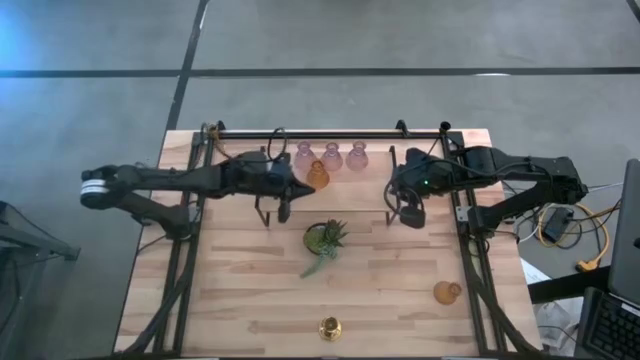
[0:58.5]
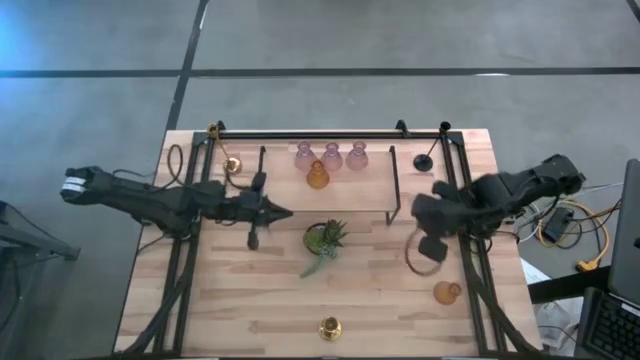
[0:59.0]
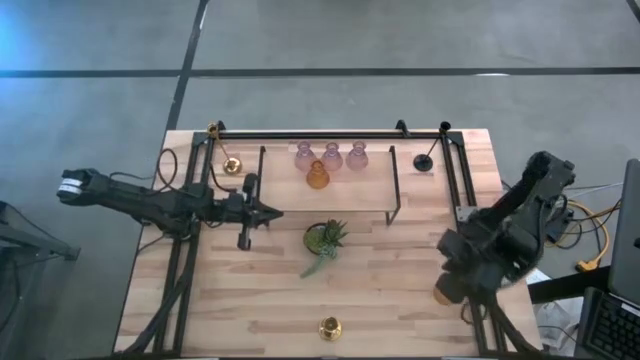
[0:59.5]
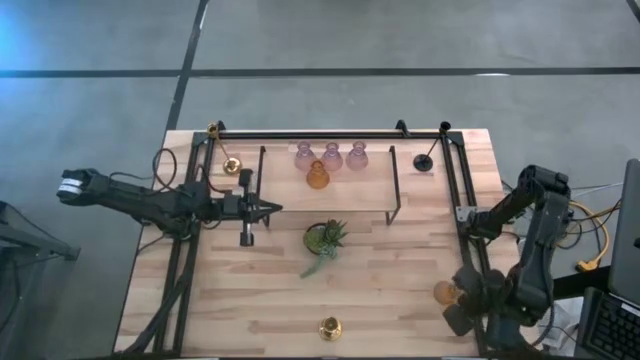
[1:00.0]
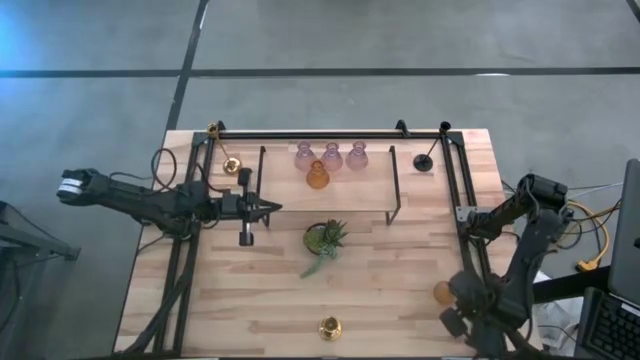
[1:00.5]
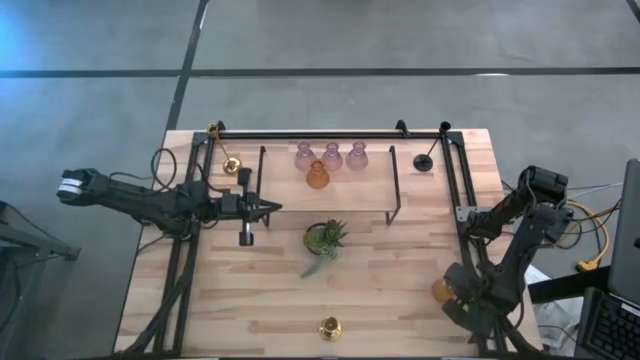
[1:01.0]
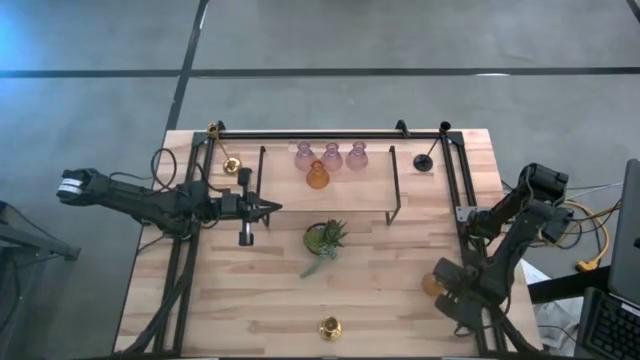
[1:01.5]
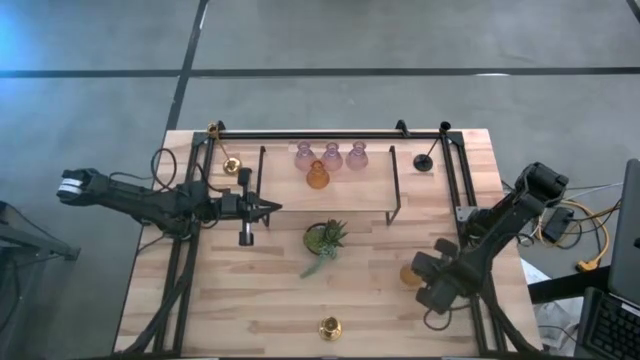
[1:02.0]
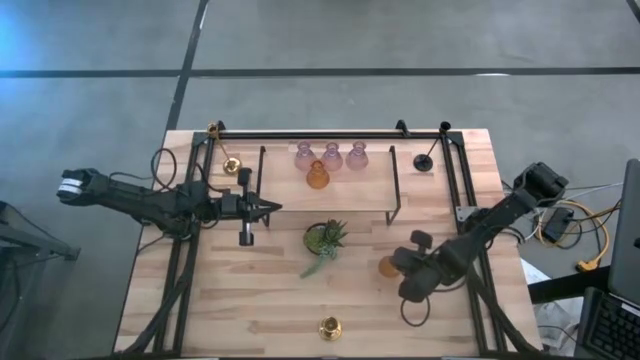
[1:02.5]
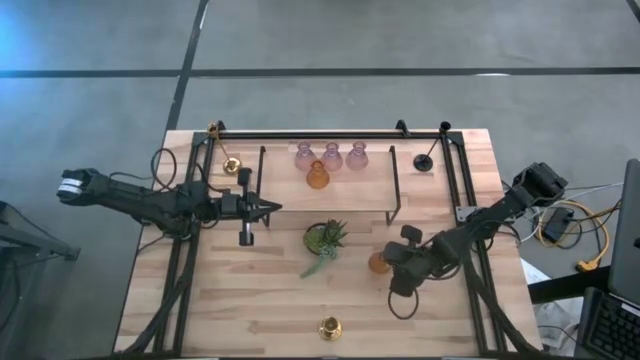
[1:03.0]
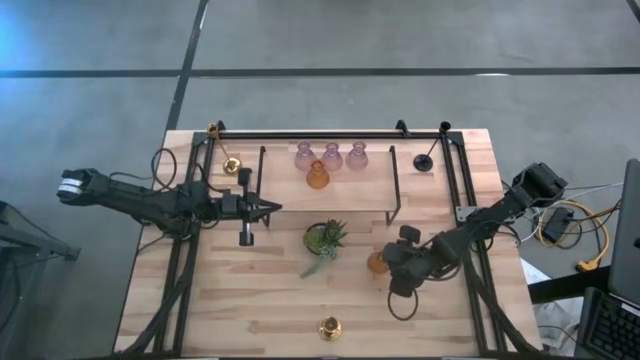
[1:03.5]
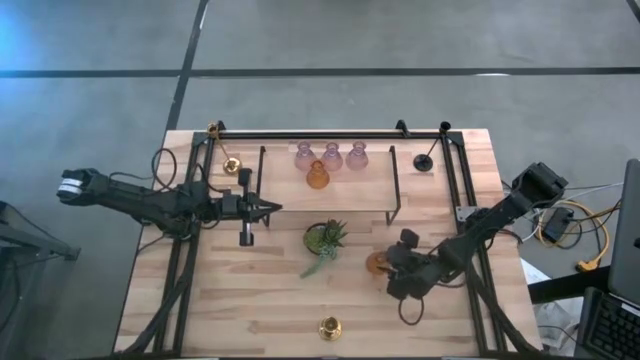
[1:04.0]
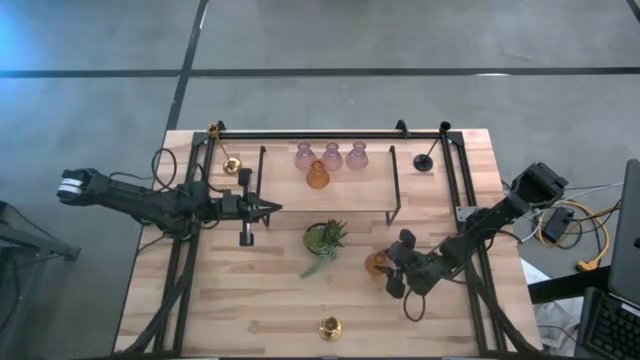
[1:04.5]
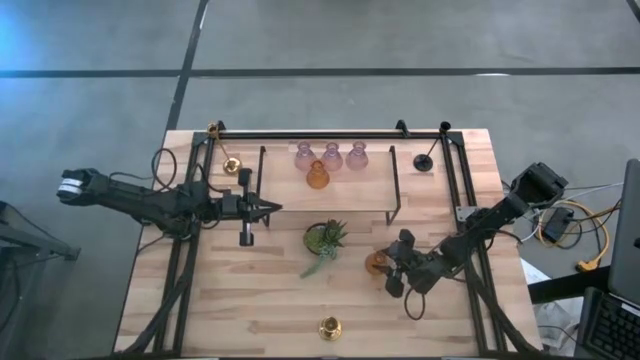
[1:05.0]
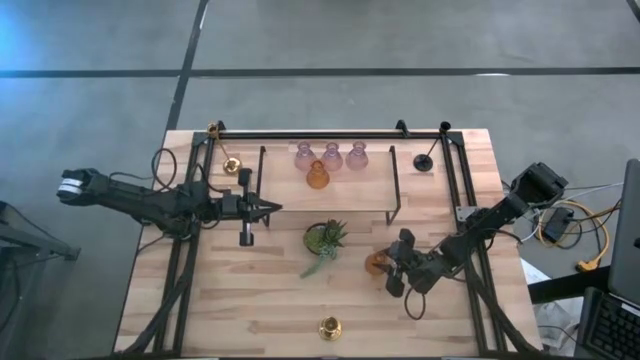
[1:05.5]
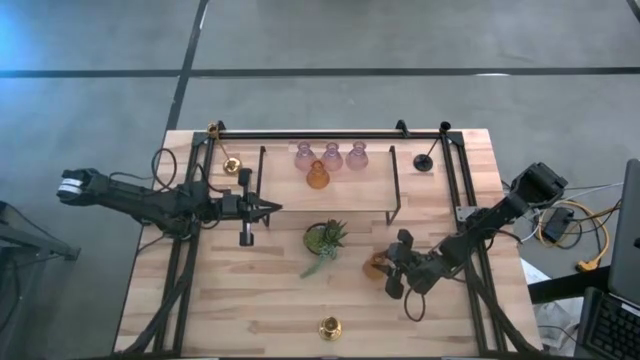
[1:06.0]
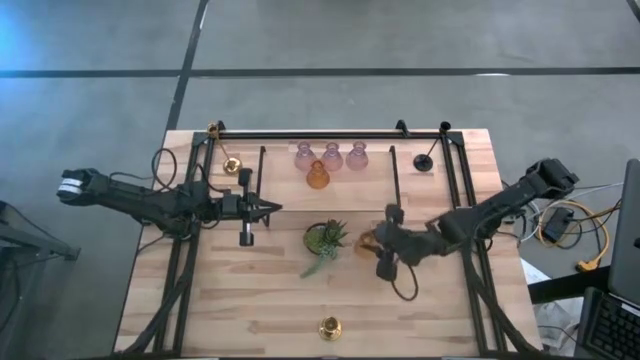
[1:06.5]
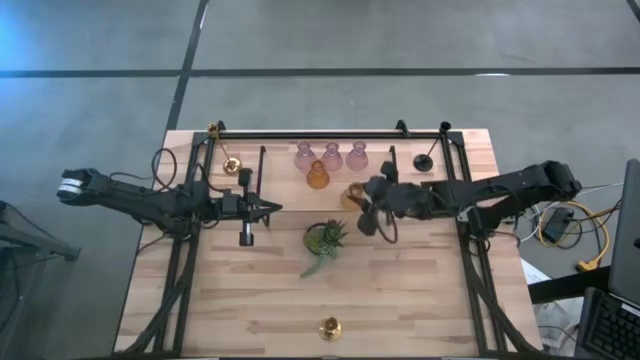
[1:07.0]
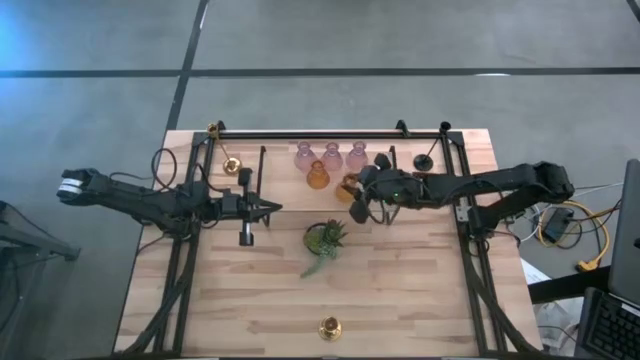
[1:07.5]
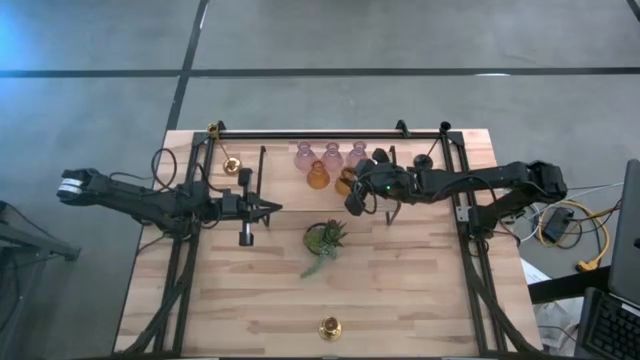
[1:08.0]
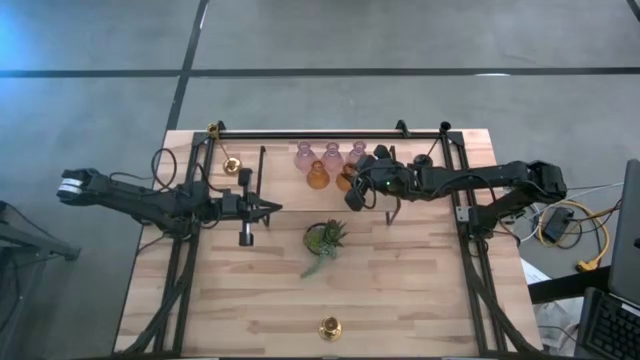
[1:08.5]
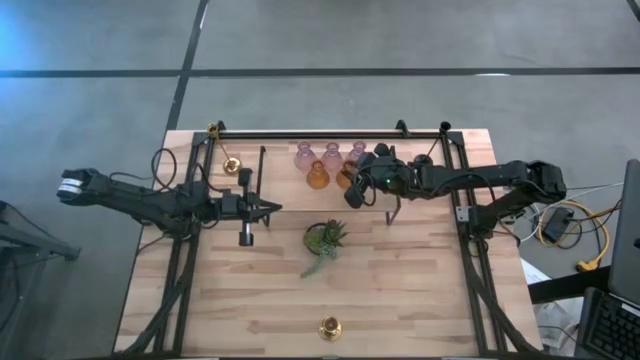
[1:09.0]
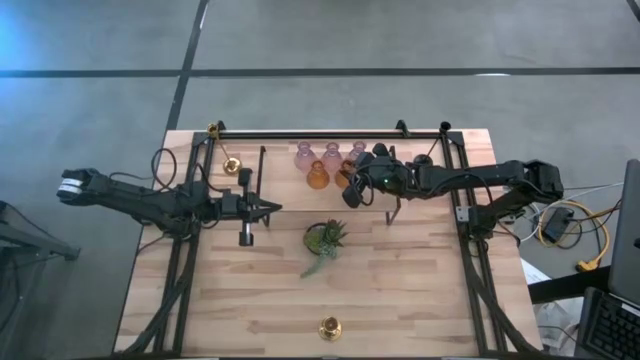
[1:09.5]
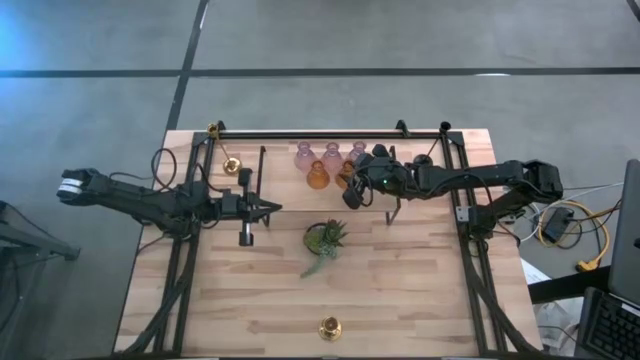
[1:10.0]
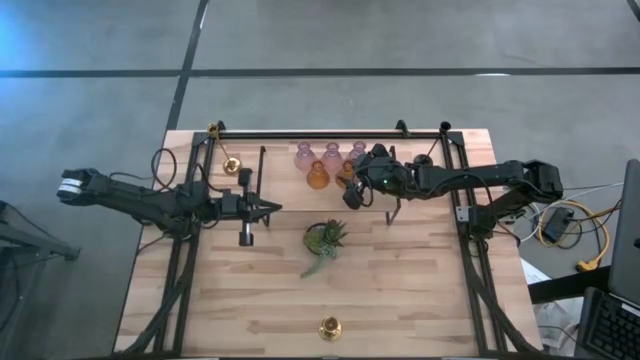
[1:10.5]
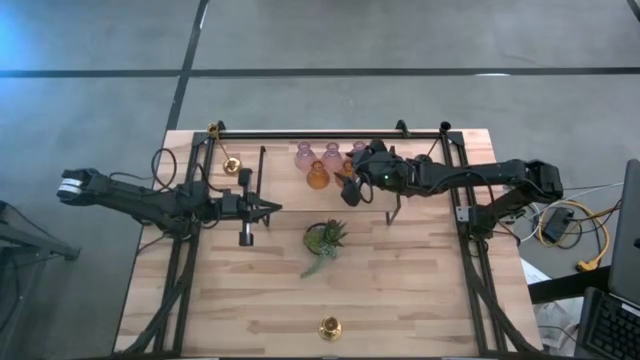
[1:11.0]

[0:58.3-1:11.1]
Task: Pick & Place candle stick holders
Put the yellow glass candle holder on the shelf

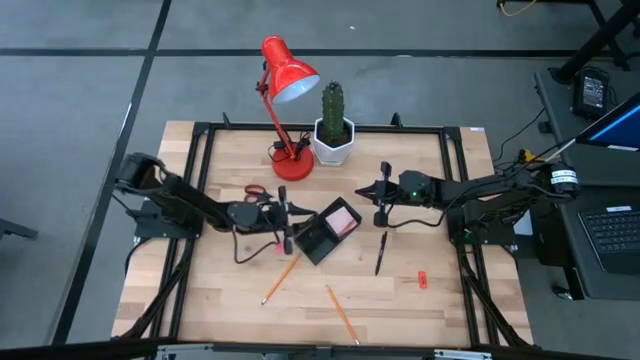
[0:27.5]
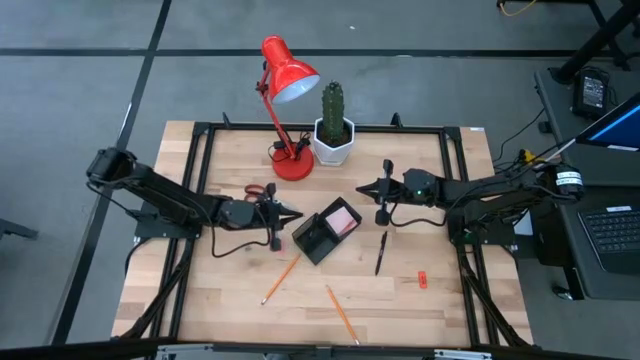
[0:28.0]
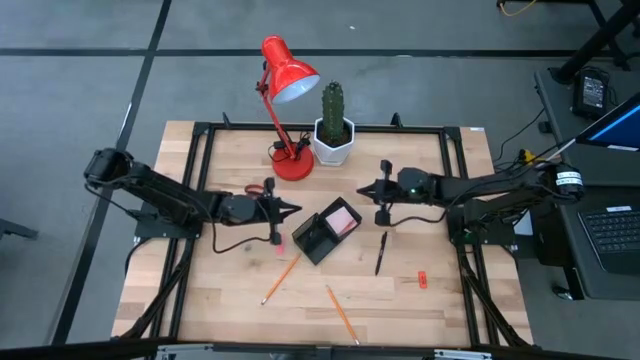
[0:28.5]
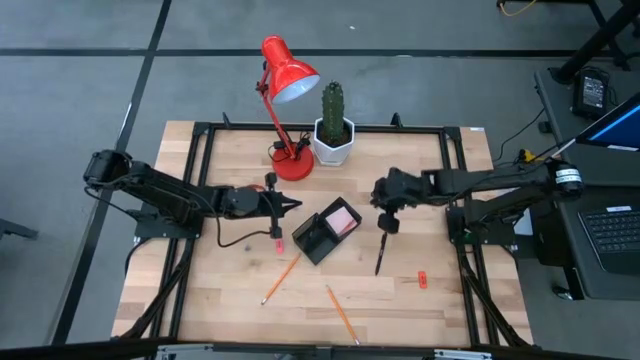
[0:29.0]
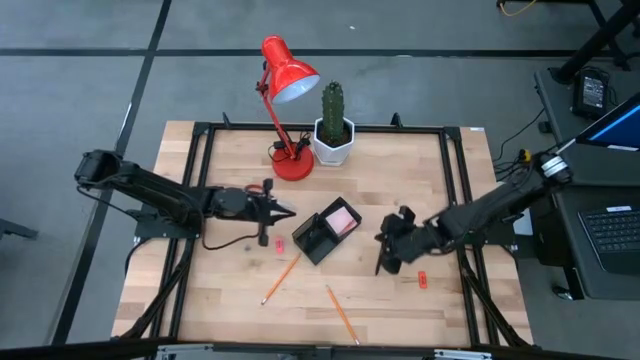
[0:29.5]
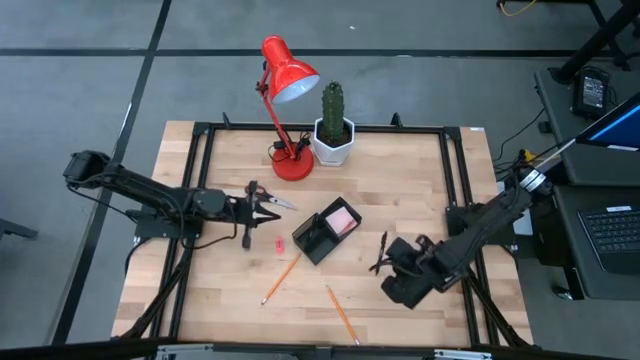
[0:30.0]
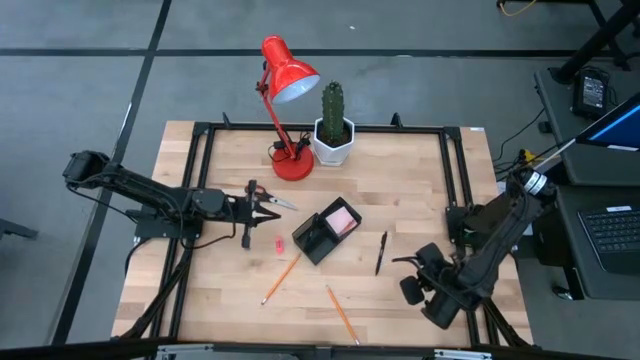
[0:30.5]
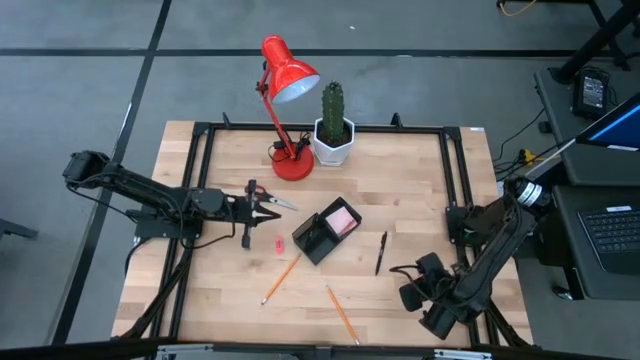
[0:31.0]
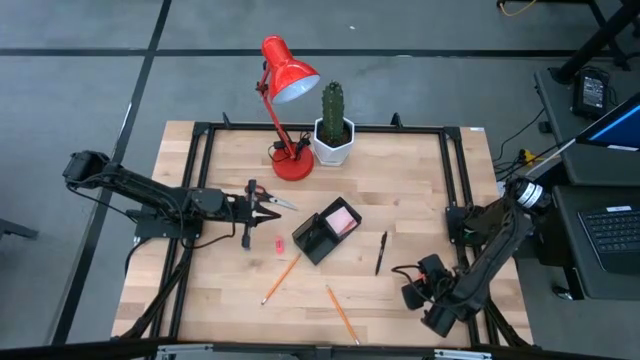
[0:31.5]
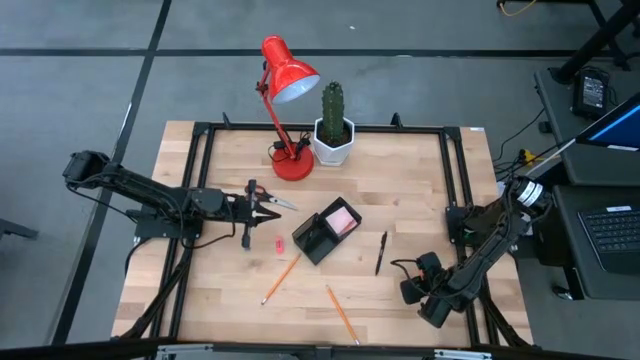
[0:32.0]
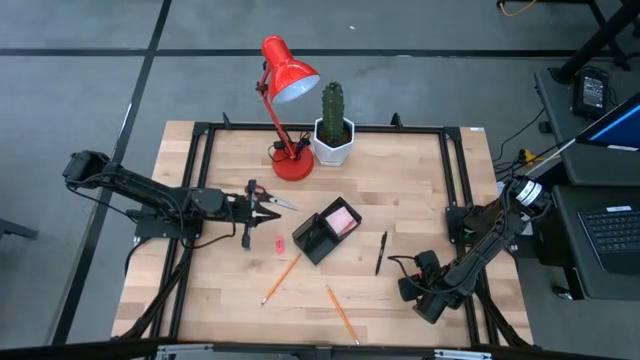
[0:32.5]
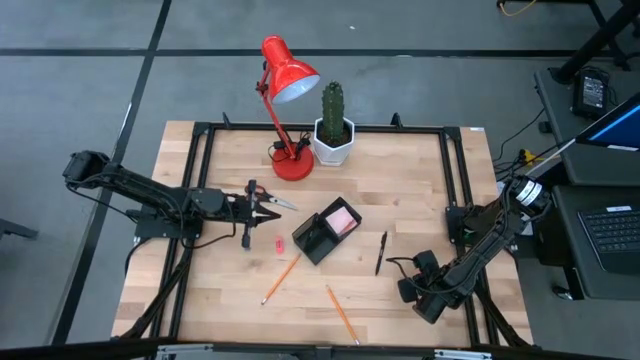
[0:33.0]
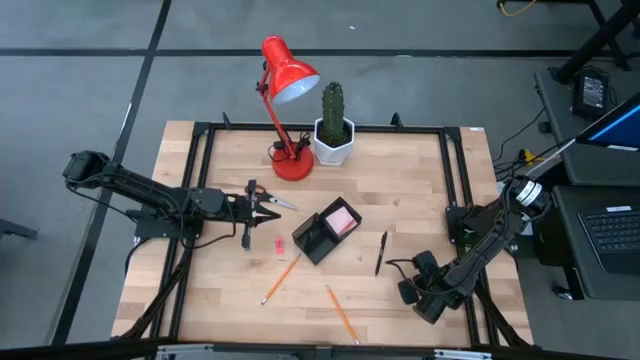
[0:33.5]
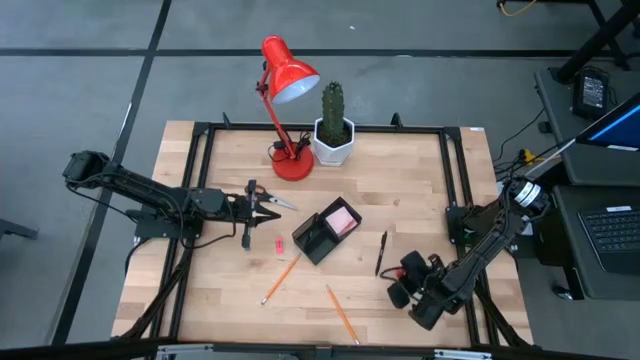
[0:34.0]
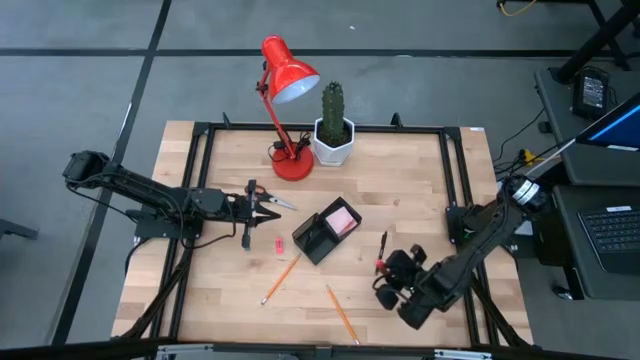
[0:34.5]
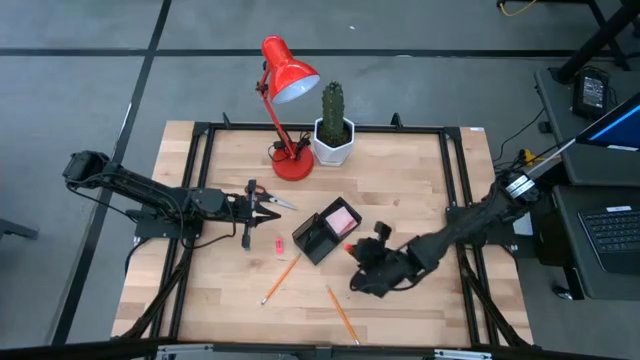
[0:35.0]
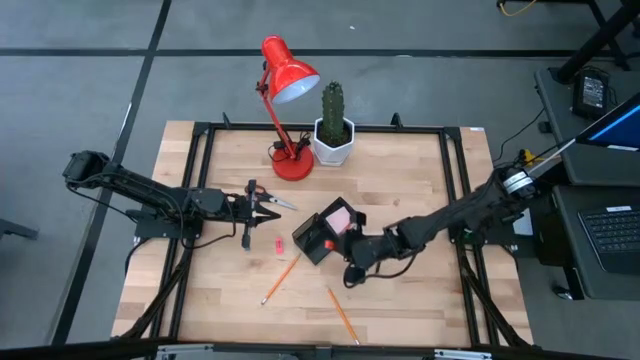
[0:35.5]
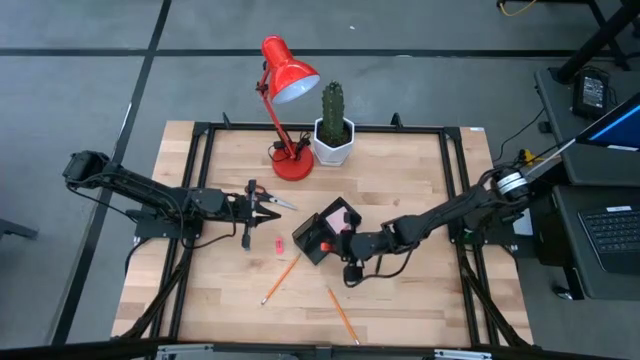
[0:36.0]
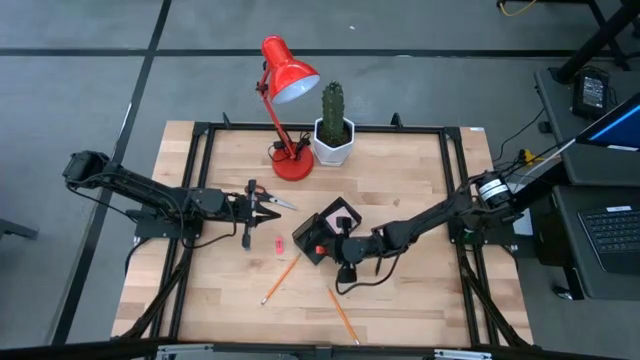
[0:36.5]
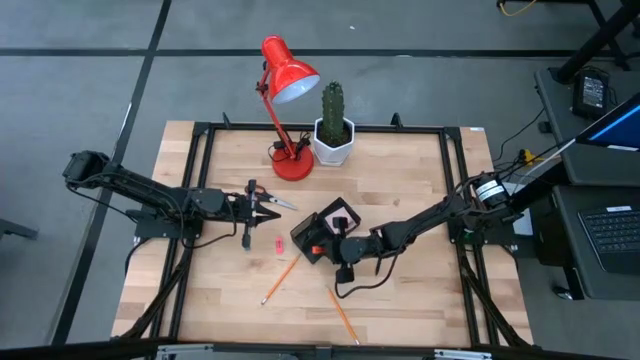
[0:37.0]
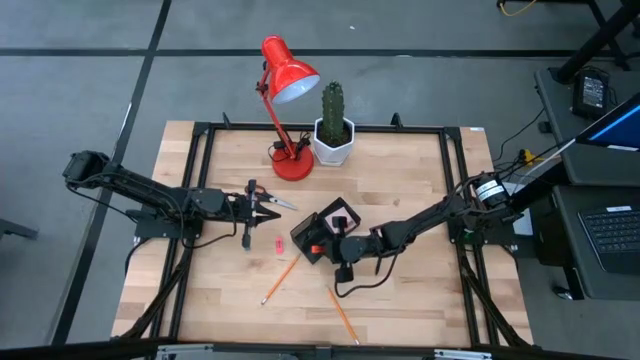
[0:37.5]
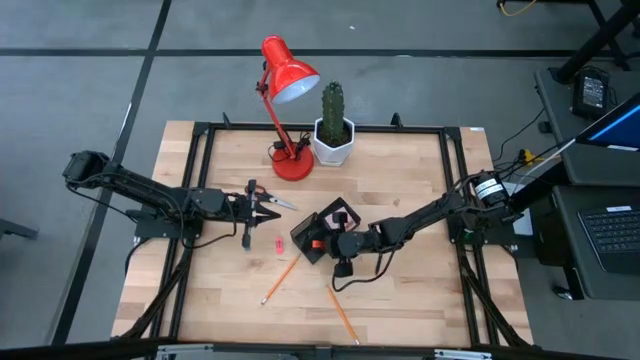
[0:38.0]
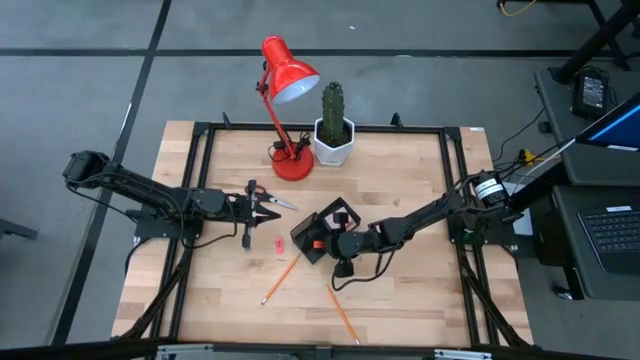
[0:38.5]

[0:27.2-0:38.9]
Task: Pick and place office supplies into organizer
Put the orange eraser into the black desk organizer
